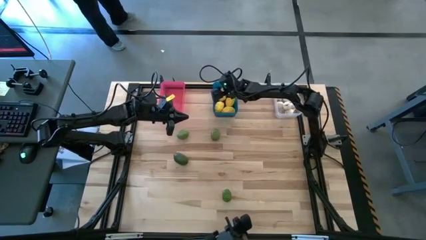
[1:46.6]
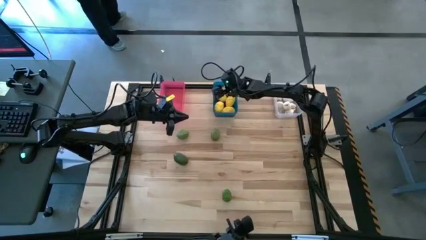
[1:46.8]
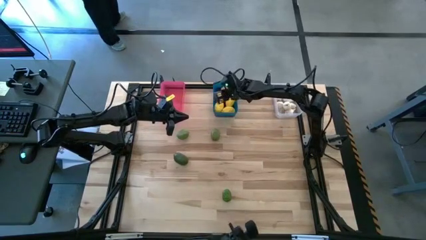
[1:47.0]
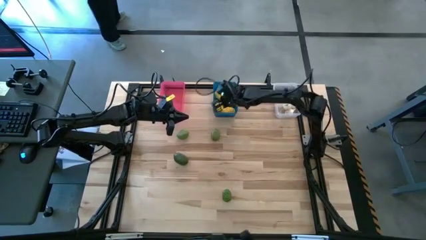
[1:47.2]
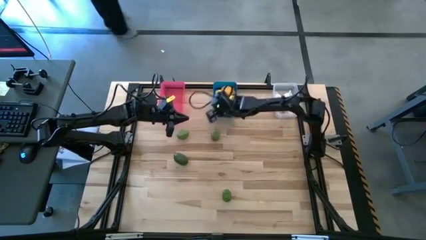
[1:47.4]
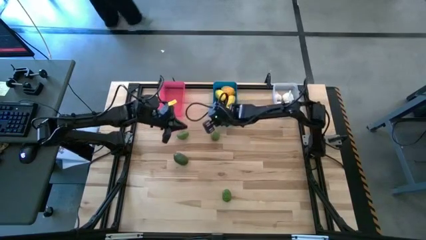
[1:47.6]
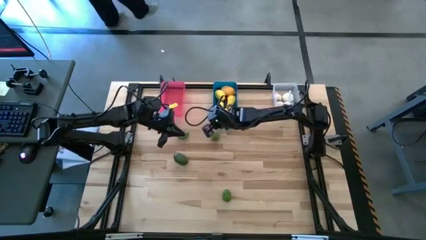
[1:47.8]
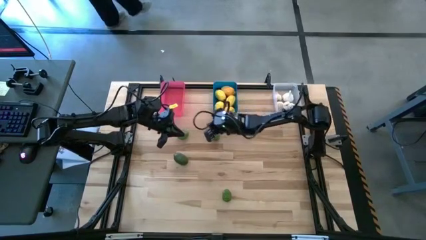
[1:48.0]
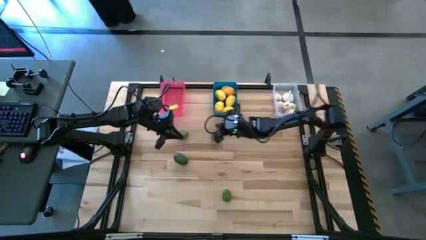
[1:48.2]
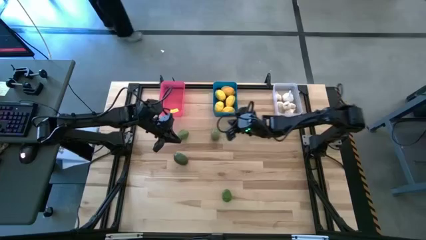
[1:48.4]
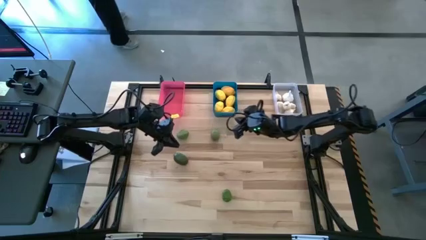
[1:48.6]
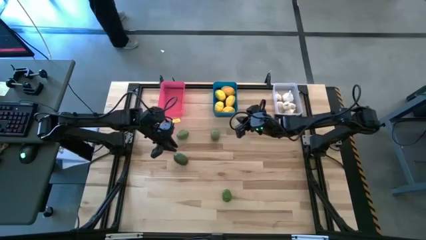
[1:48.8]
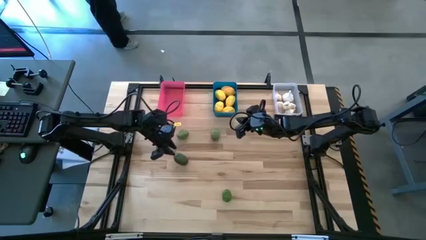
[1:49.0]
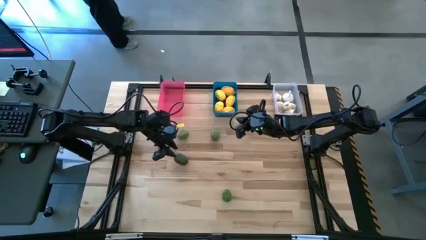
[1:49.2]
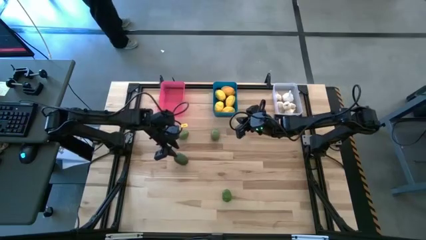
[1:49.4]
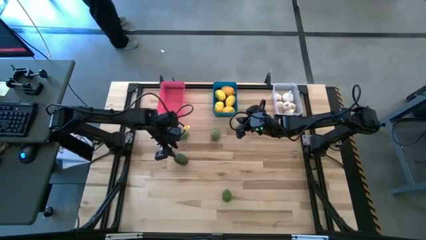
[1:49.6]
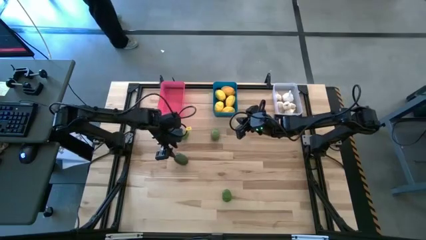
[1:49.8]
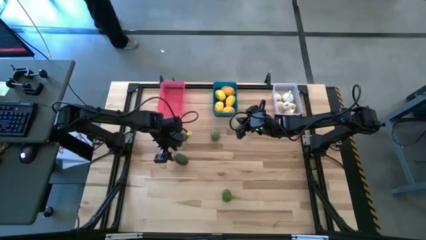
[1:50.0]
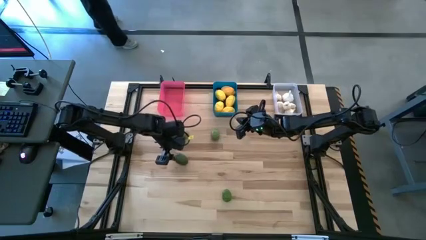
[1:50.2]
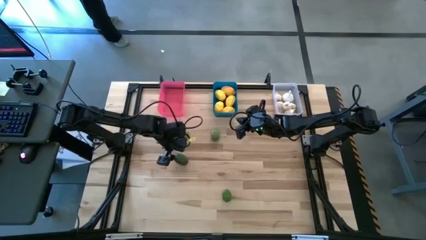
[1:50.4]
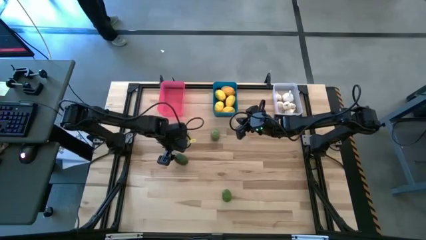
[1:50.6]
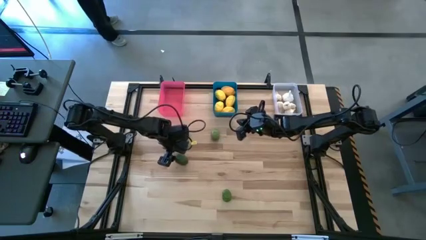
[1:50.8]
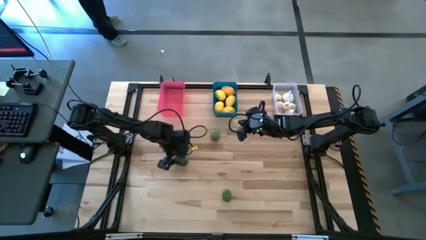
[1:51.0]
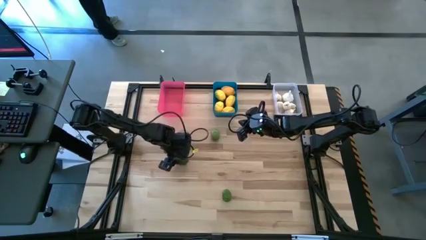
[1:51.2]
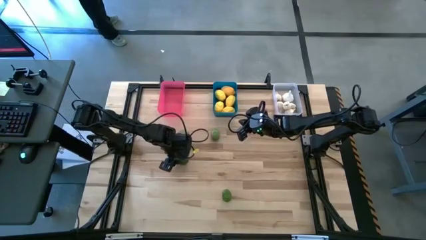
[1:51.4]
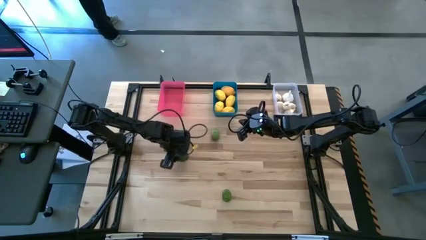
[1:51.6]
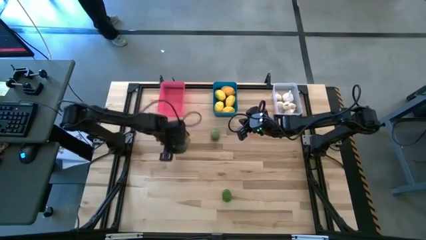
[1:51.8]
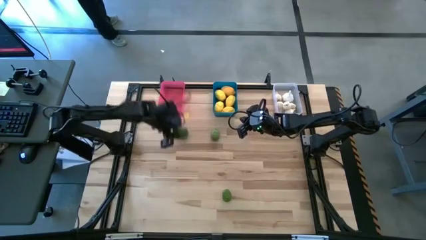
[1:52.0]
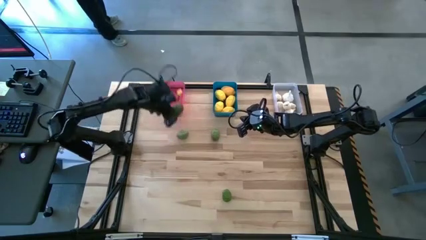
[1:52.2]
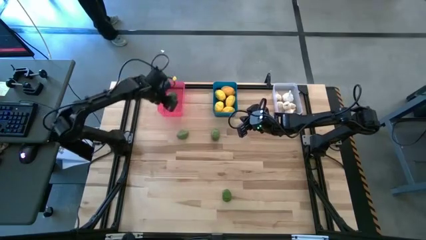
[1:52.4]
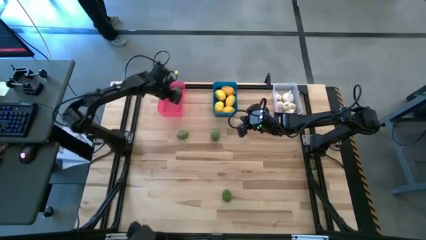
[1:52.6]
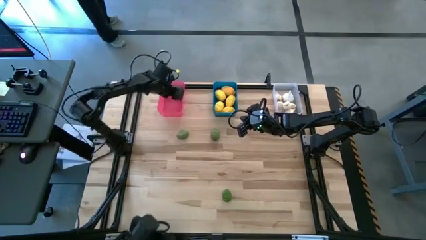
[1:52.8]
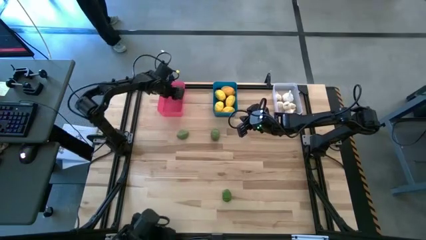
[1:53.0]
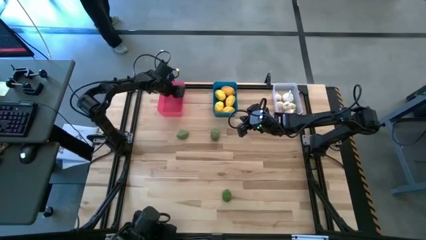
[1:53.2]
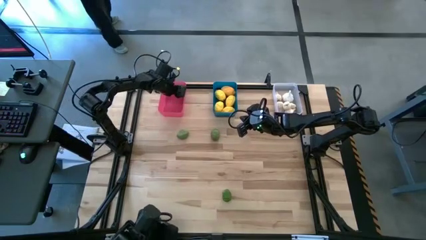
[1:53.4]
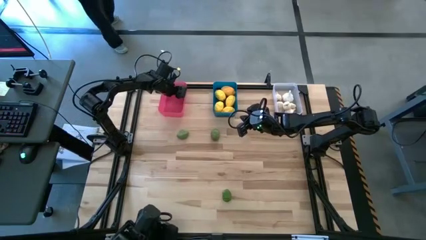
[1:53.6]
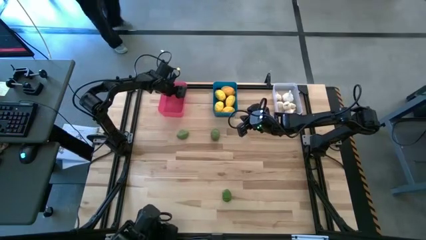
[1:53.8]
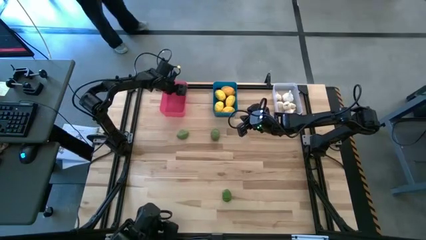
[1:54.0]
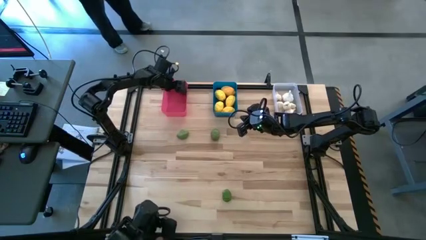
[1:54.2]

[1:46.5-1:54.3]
Task: Sort produce into baskets
Put the lime into the red bin

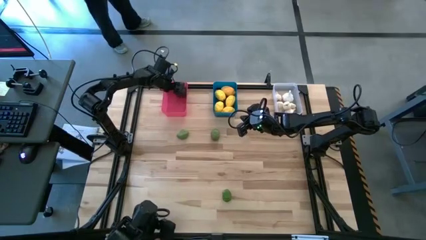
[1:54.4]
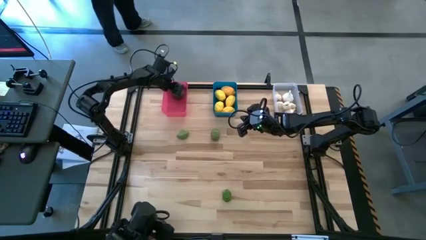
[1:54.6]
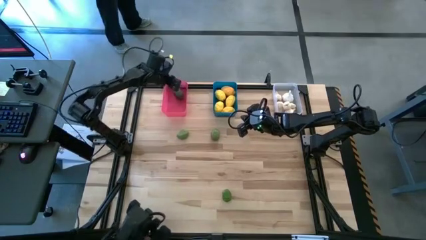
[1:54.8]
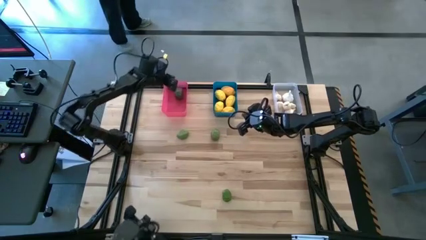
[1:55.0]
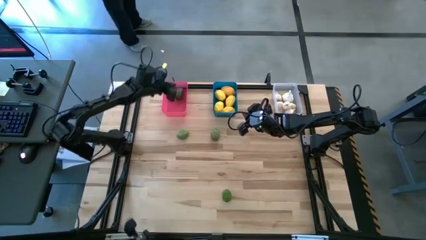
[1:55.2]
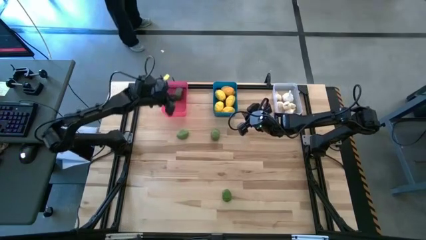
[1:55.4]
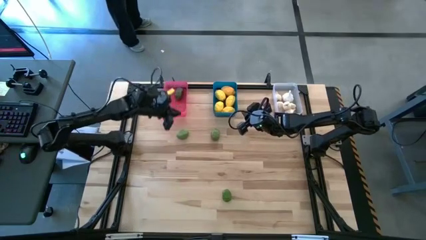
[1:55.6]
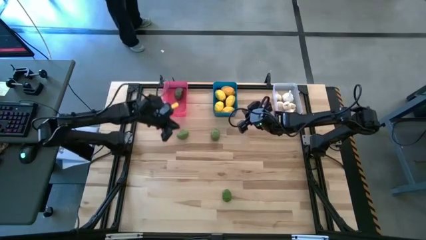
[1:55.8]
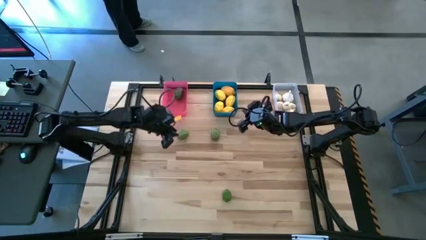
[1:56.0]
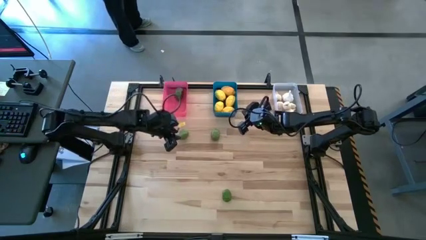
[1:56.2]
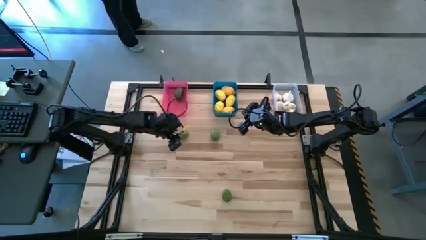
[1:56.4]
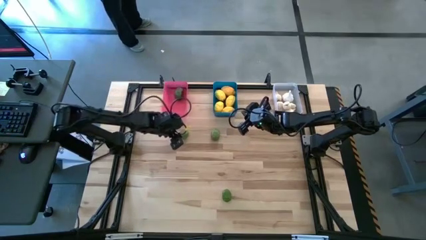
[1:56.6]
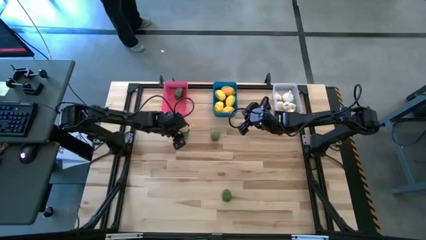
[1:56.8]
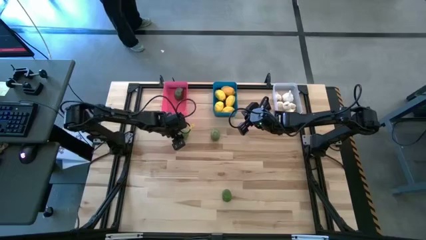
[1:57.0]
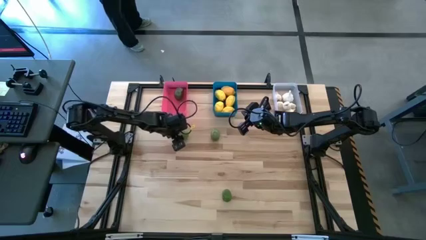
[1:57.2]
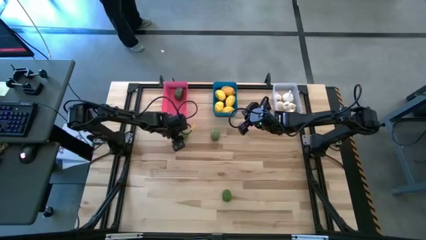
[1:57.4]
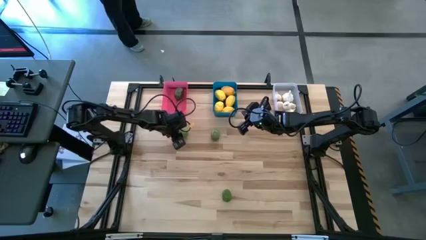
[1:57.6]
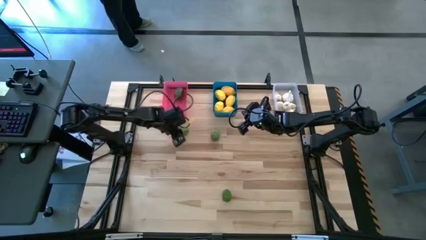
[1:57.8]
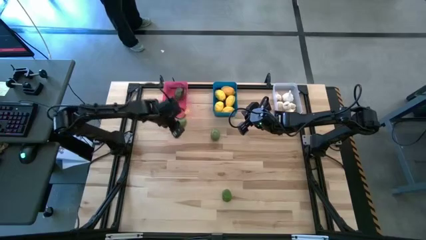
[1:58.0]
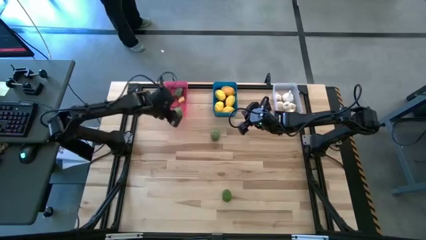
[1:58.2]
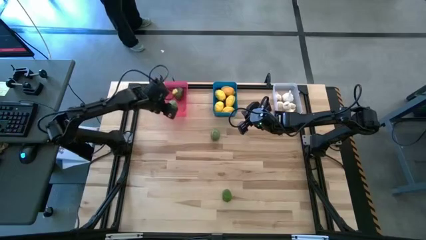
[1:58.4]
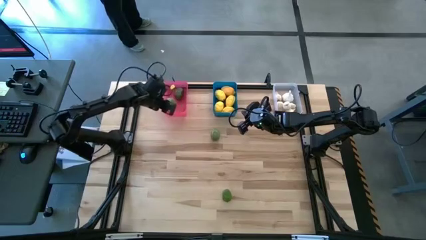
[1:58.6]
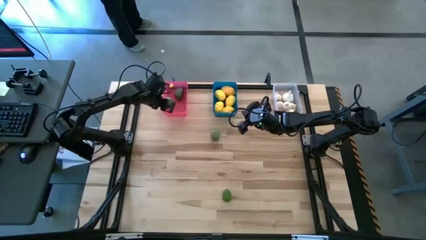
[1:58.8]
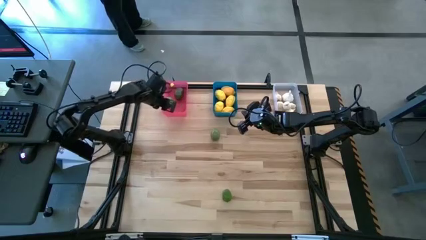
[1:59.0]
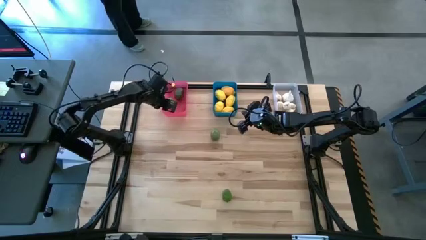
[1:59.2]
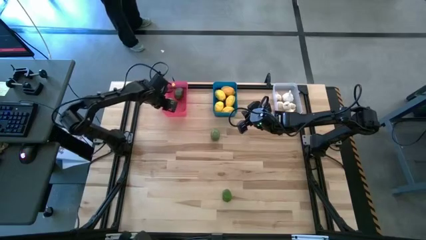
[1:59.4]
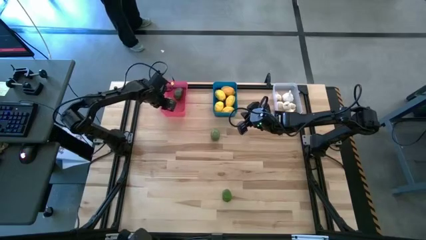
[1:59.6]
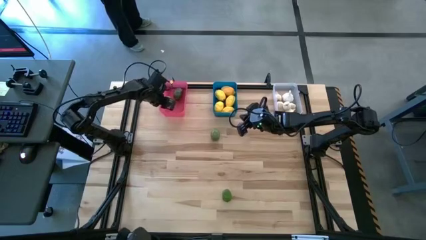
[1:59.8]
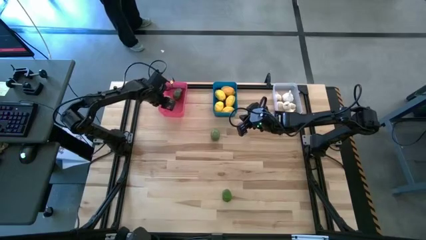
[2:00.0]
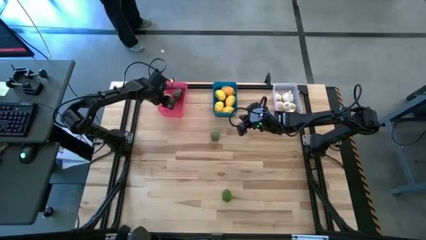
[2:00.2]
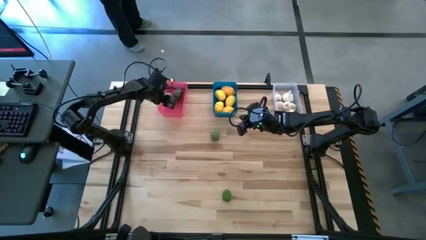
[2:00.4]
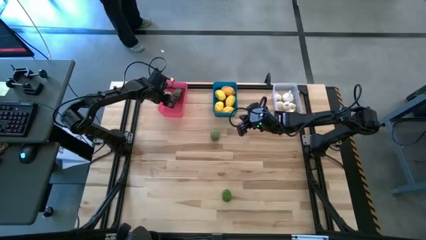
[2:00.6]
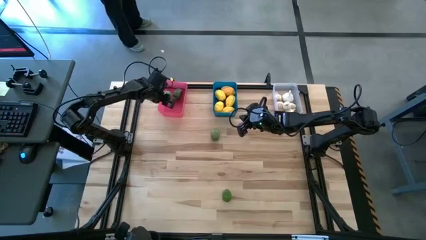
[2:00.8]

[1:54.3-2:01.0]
Put the lime into the red bin

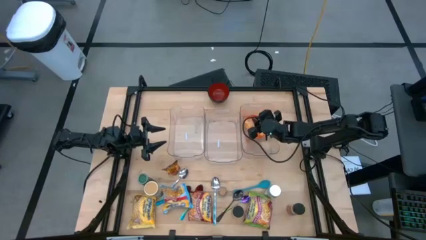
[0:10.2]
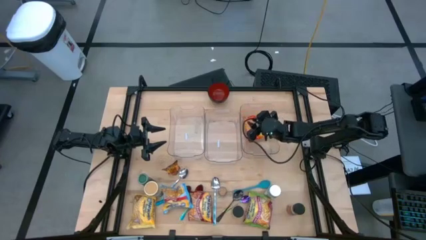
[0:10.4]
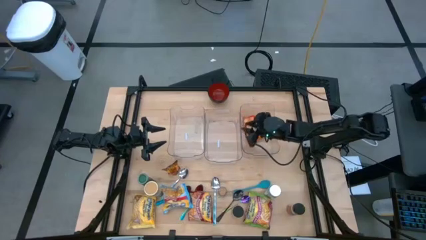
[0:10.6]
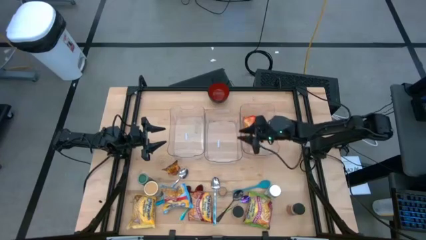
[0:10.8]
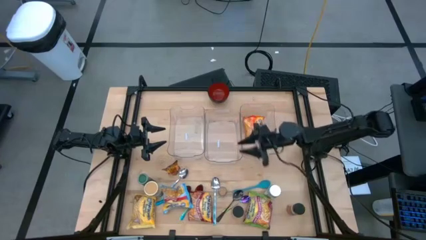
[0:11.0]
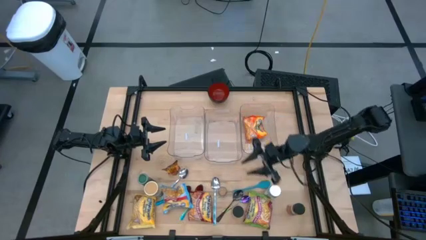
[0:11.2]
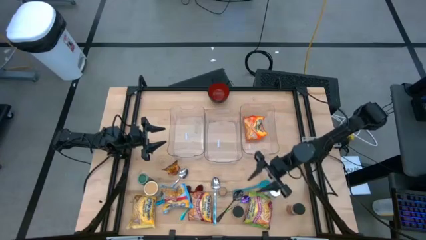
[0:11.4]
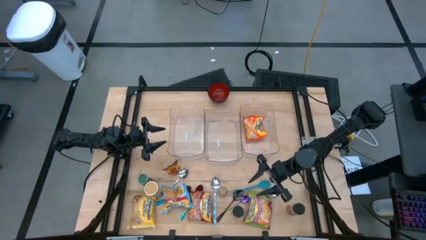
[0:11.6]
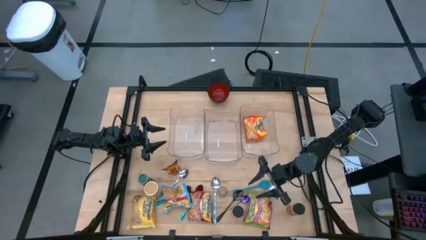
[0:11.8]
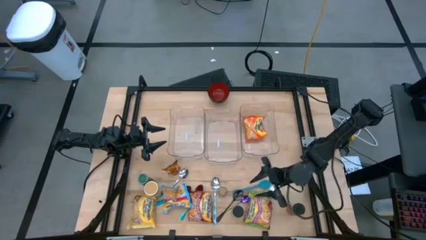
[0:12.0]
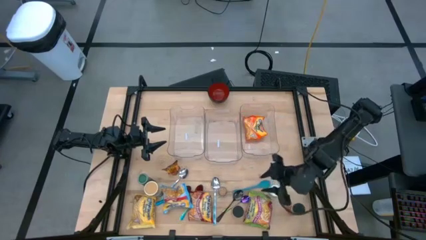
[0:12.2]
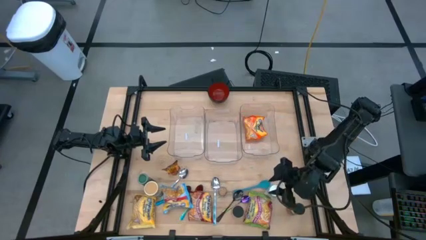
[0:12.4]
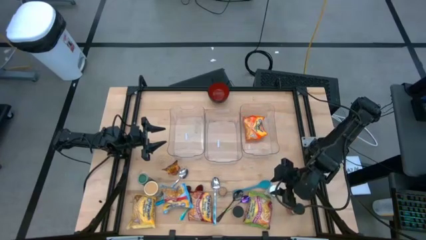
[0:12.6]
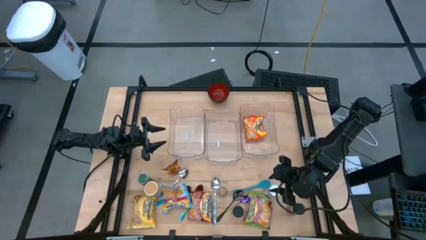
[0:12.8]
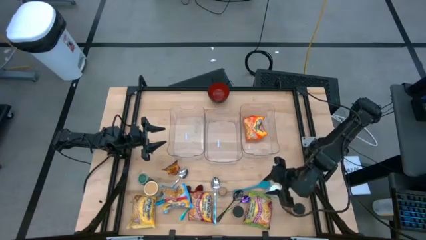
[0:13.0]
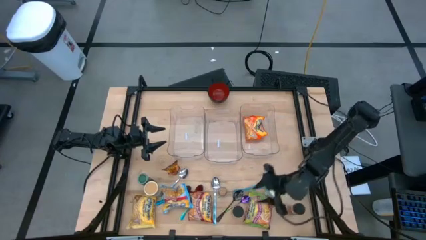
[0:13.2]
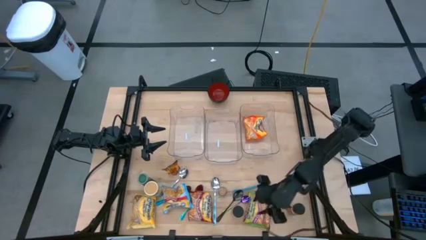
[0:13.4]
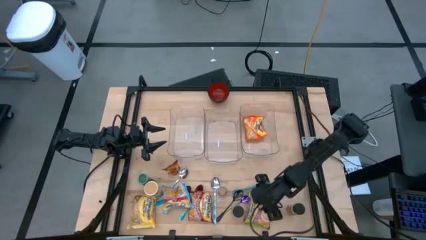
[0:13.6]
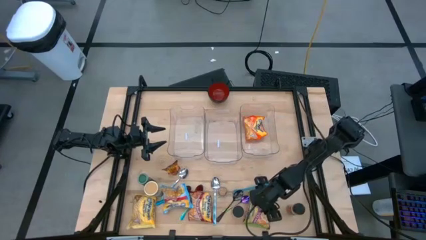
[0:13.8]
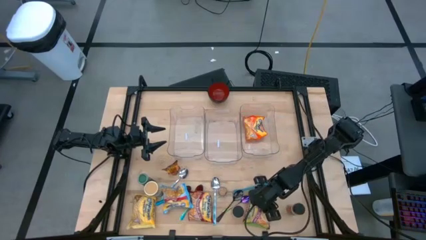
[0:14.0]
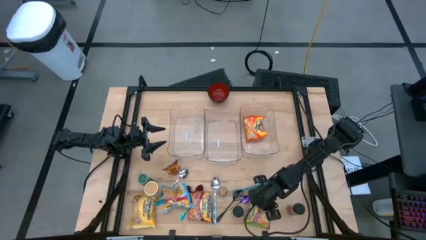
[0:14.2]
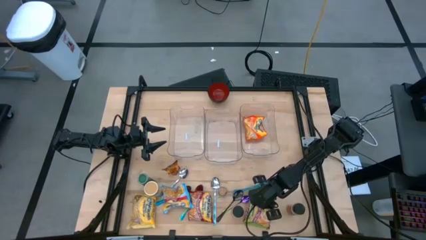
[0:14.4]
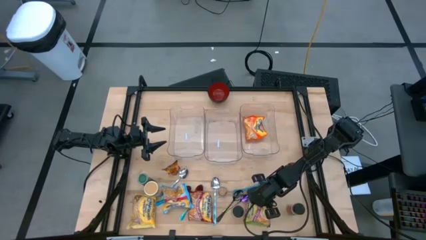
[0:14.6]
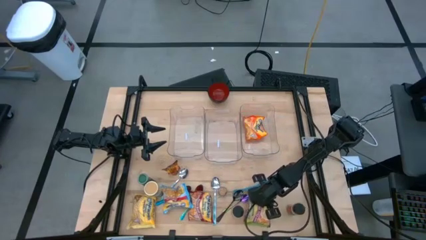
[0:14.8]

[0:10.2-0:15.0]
Task: Pick & Place Food Item
Put the green noodle pack into the right transparent bin
